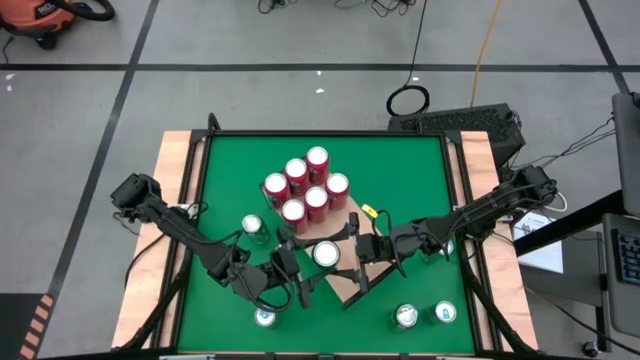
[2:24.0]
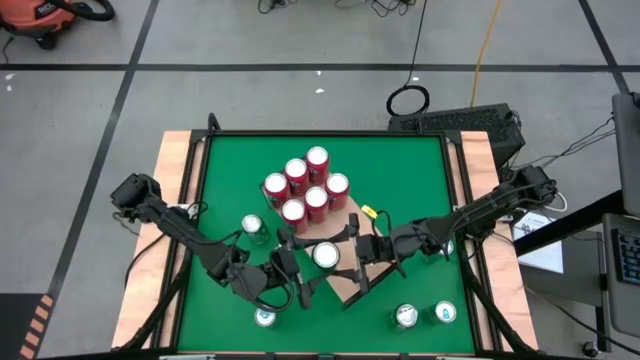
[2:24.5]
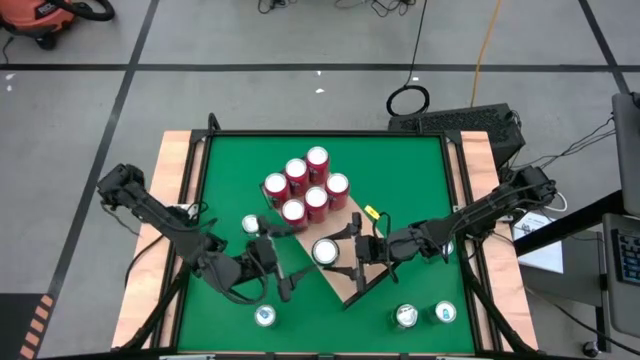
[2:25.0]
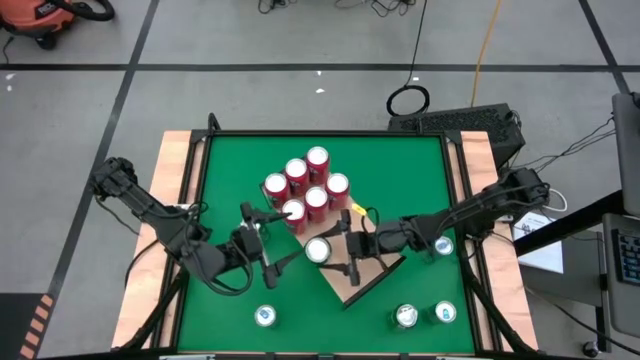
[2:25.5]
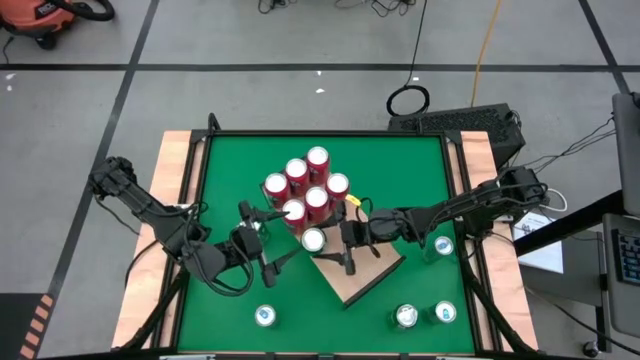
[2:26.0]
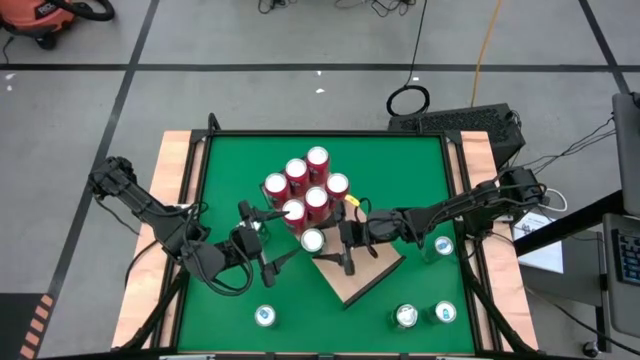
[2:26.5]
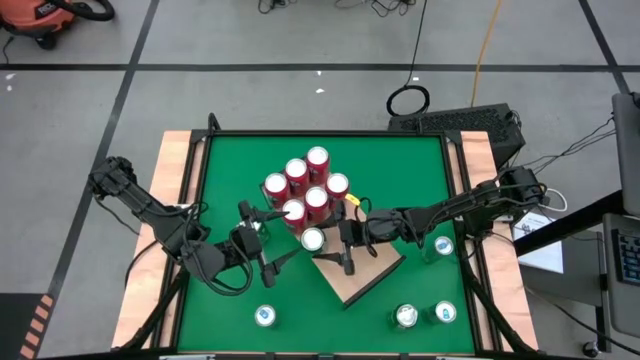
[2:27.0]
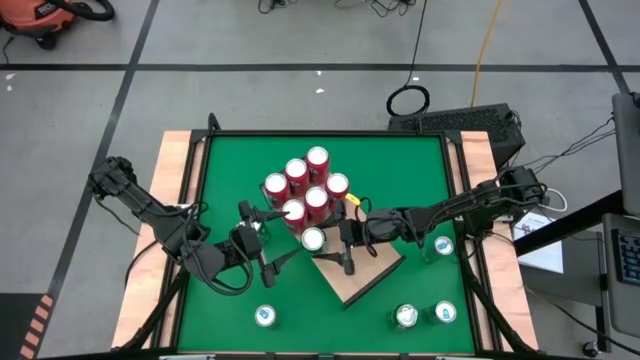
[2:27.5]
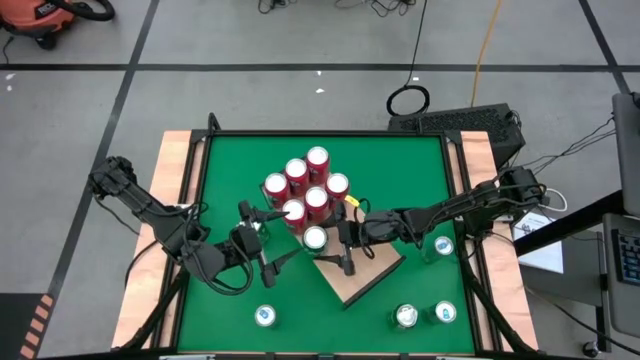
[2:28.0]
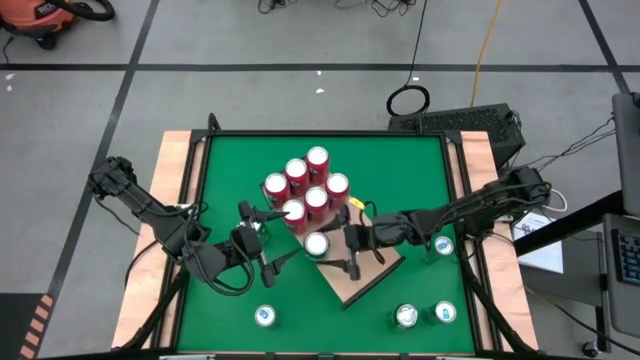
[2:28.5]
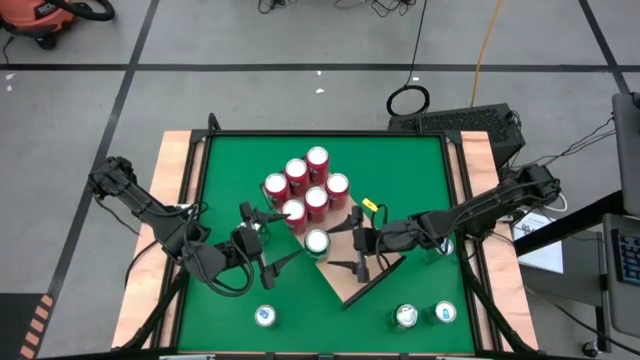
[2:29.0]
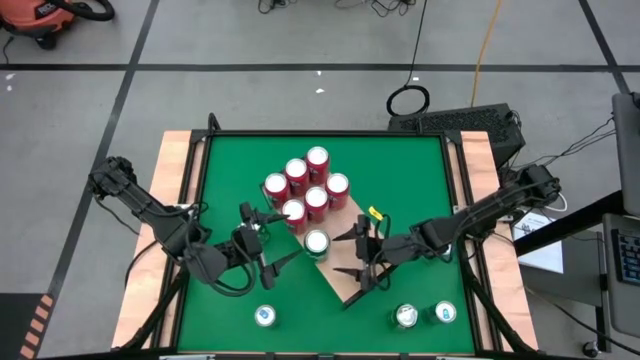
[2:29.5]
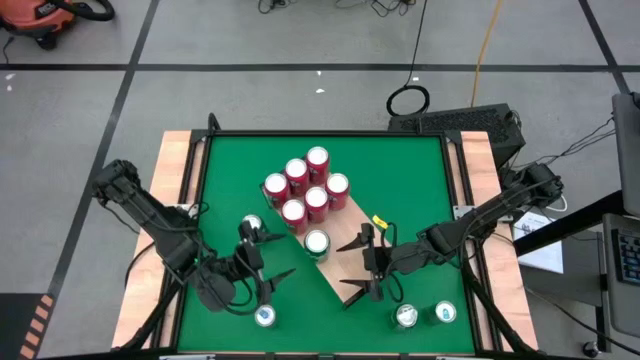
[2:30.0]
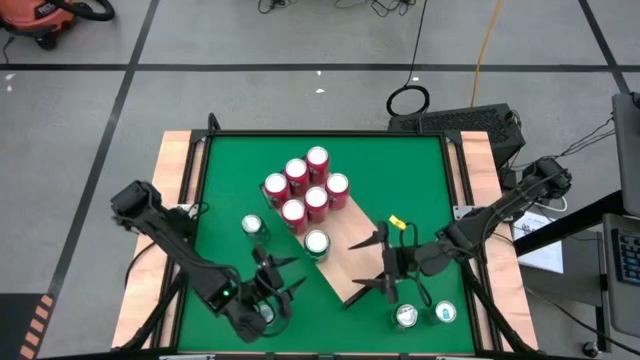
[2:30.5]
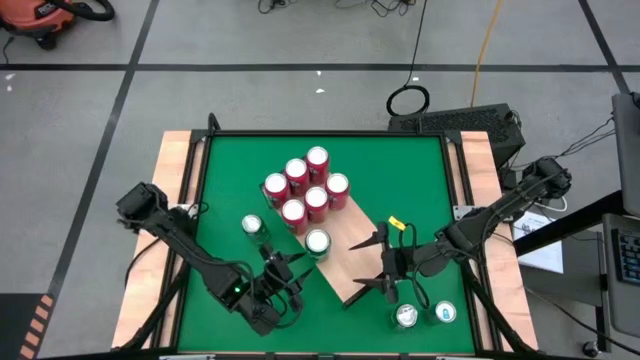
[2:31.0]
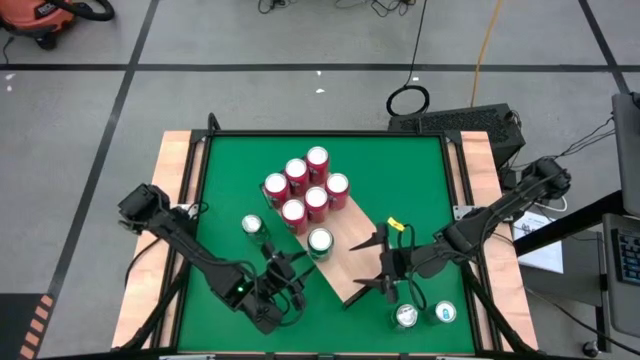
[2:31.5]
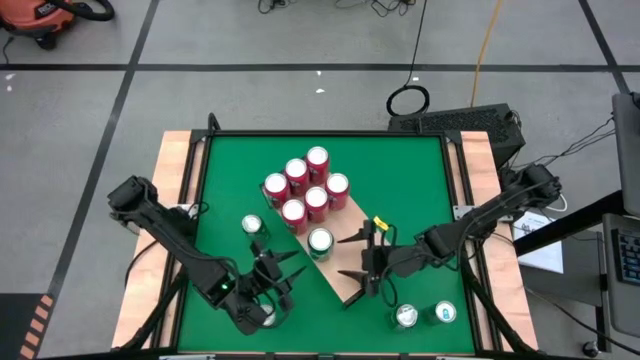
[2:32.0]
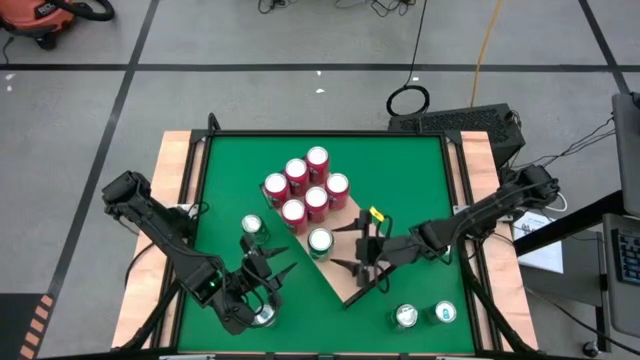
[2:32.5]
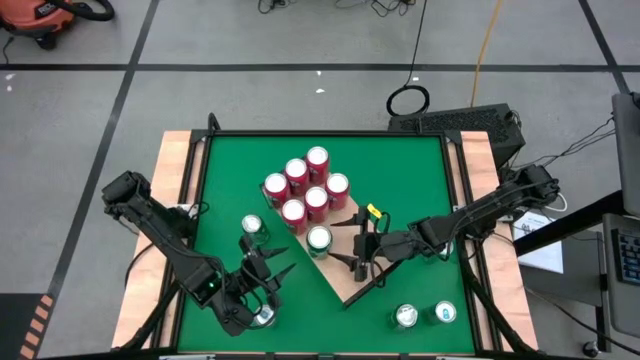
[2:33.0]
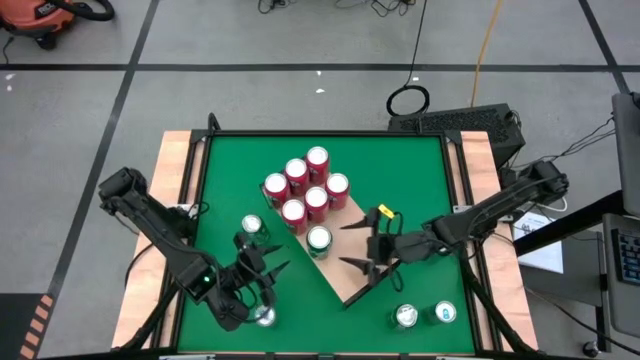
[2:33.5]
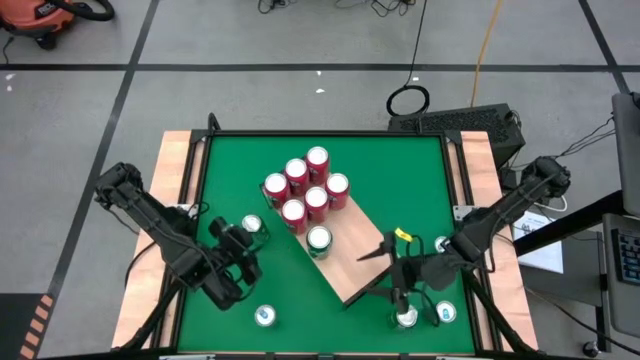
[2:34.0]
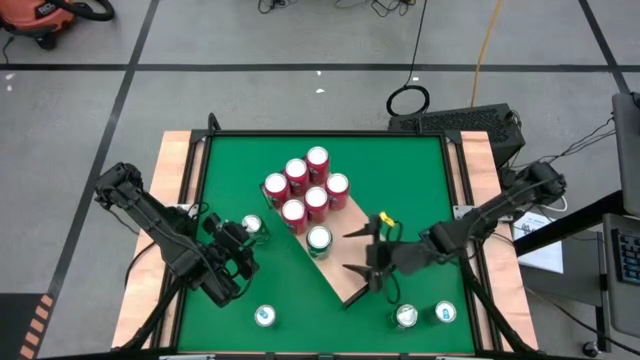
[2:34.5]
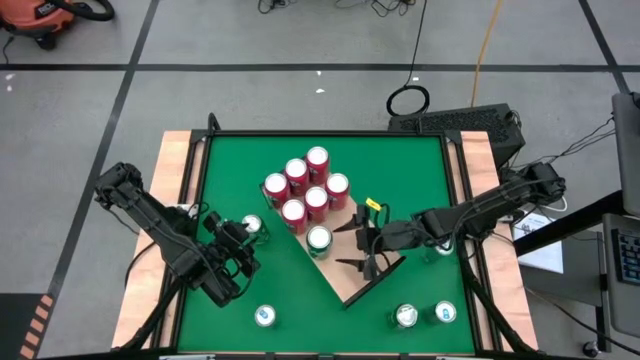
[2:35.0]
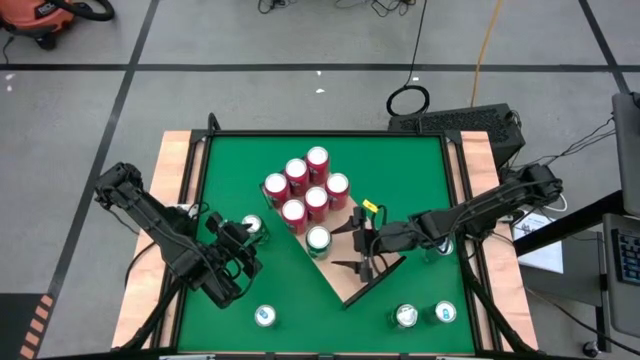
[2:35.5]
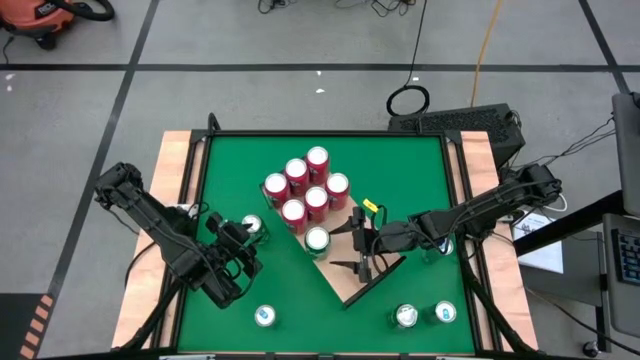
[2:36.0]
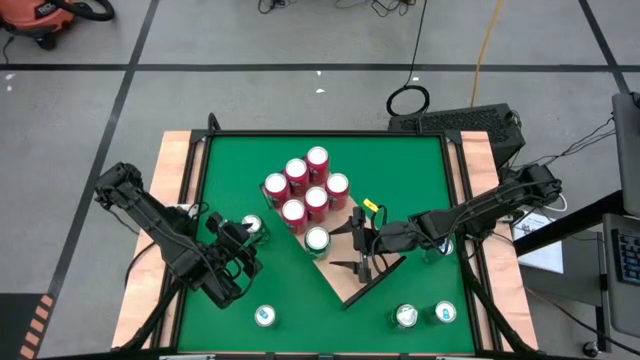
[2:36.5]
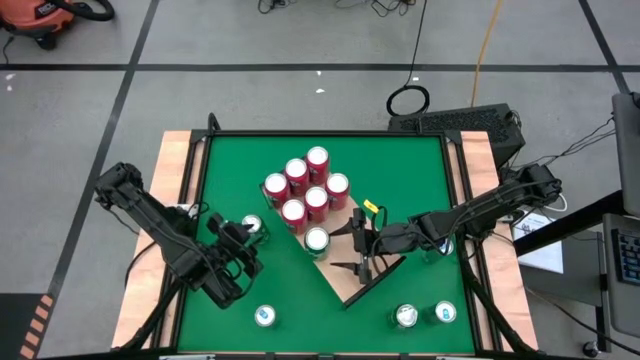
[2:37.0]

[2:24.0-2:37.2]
Task: Place canned beverage on shelf
Put the green soda can on the shelf

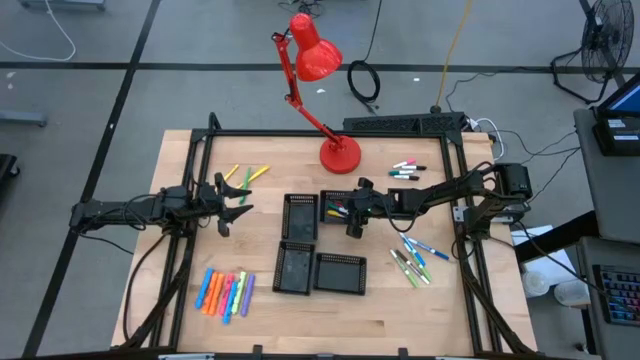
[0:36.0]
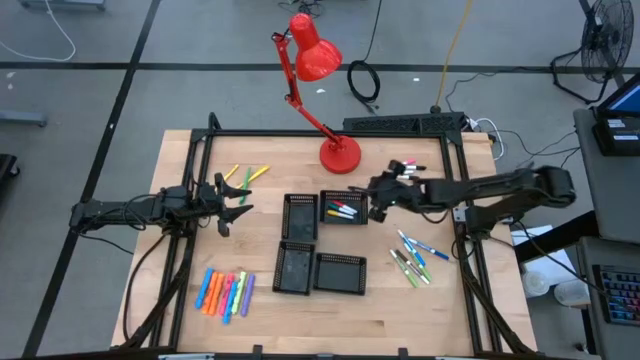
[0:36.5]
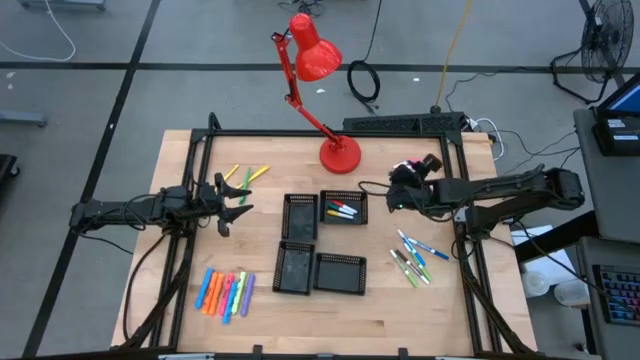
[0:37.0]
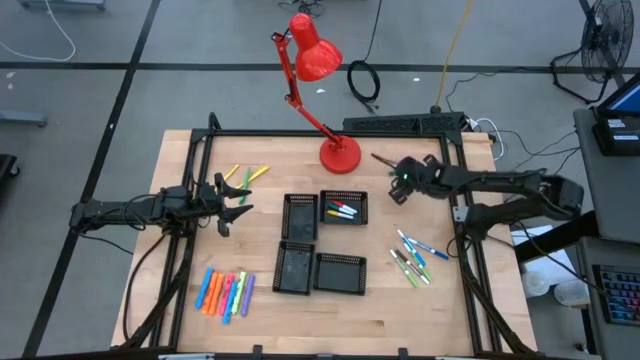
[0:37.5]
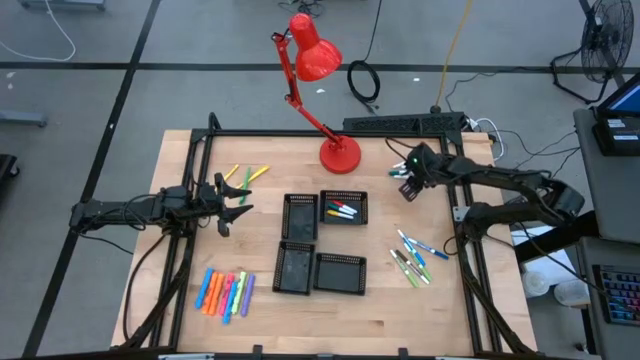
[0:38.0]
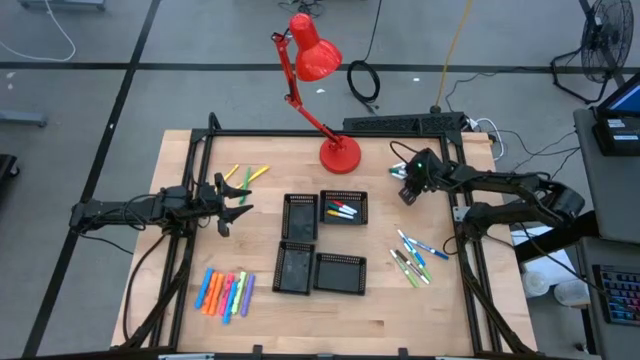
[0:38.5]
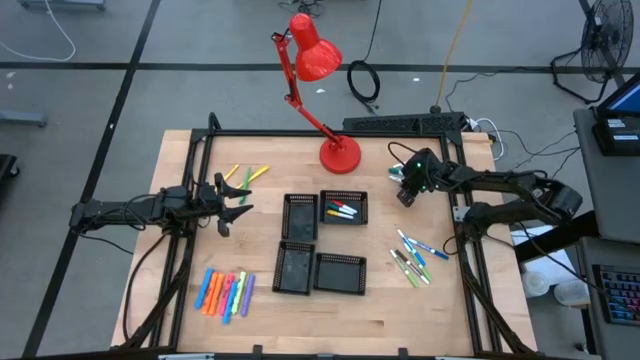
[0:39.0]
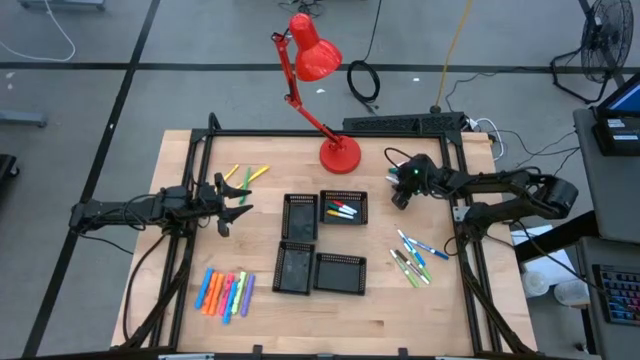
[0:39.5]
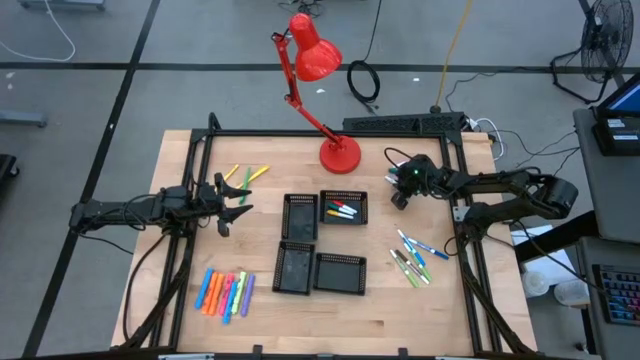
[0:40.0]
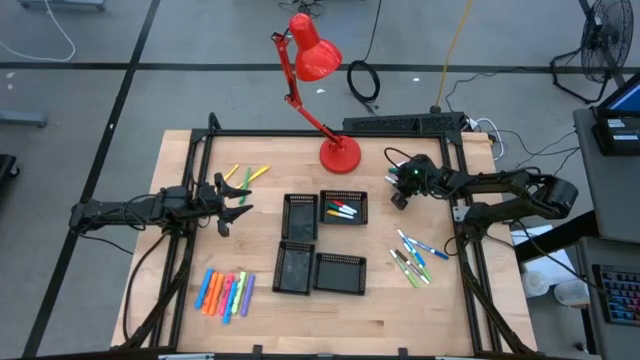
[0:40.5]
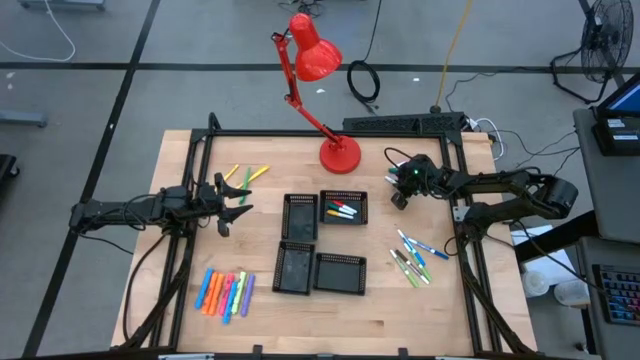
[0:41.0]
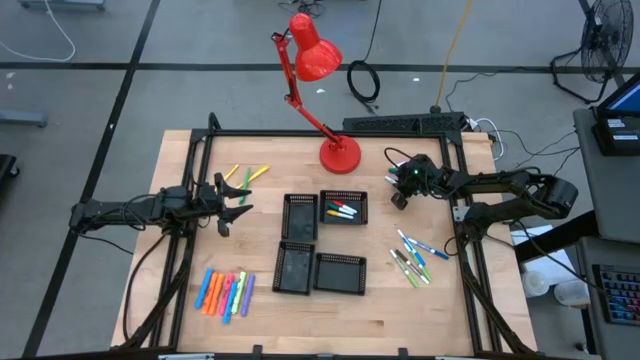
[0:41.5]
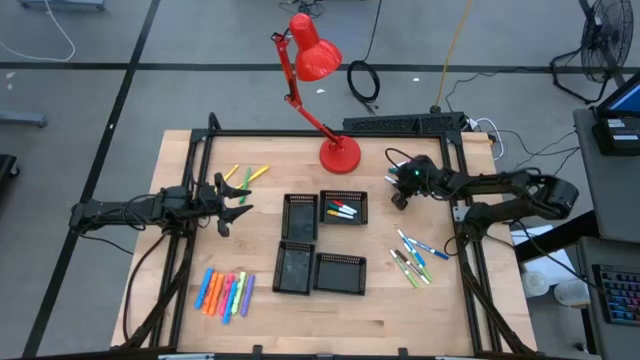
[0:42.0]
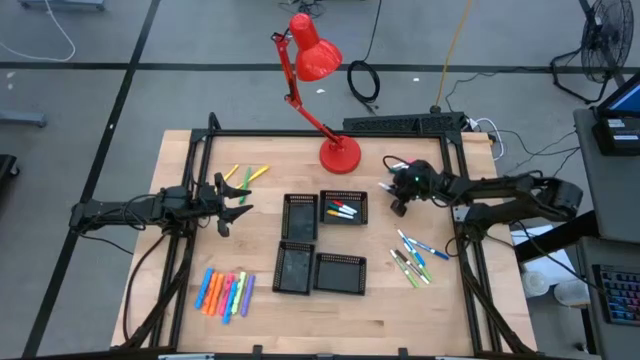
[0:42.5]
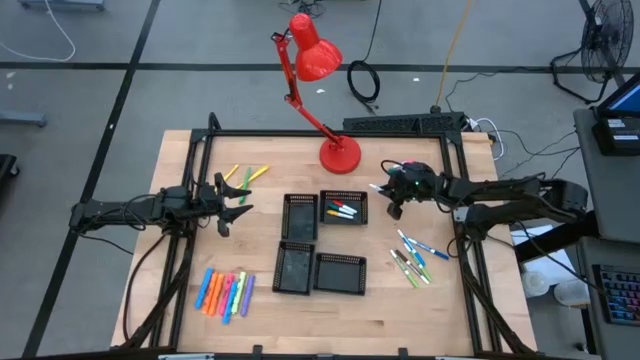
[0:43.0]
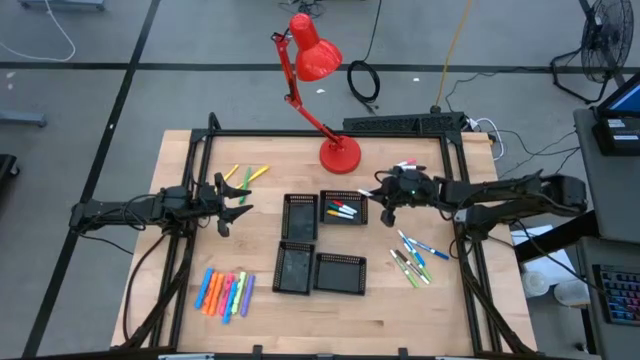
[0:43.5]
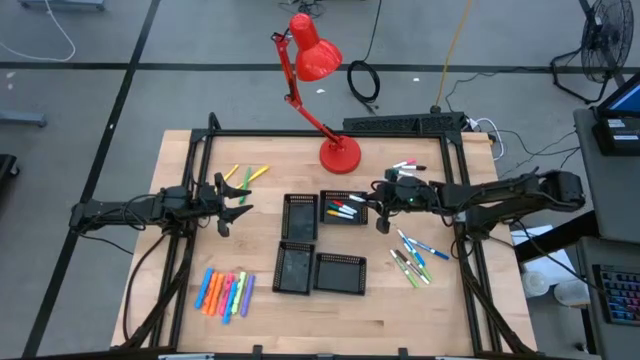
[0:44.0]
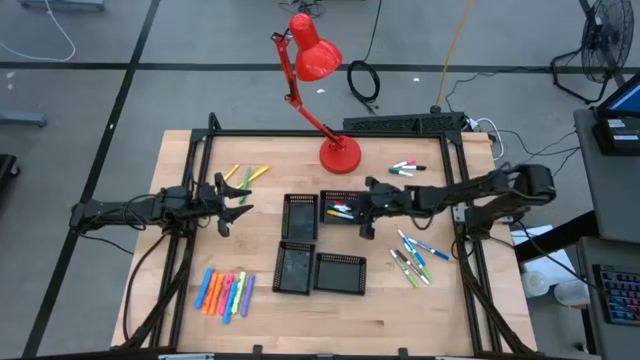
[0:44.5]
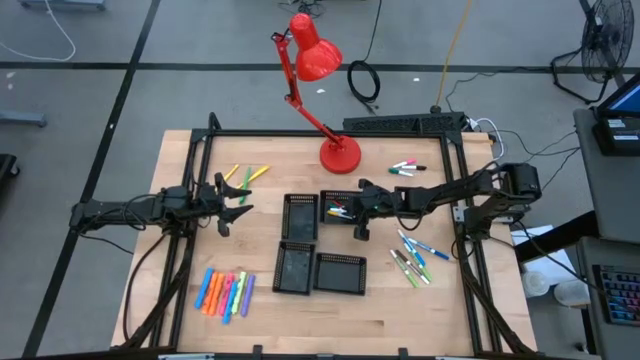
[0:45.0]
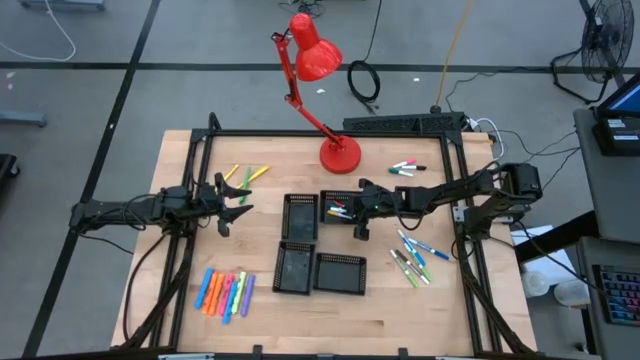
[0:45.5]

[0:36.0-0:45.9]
Task: Pick & Place Markers
Put the black highlighter pen into the top right black bin
